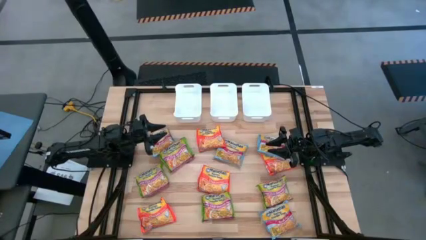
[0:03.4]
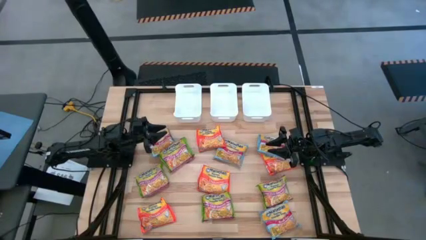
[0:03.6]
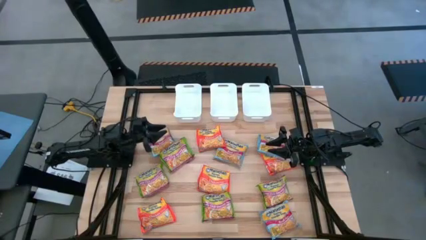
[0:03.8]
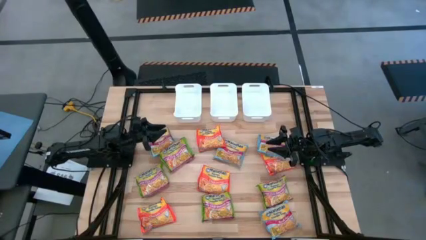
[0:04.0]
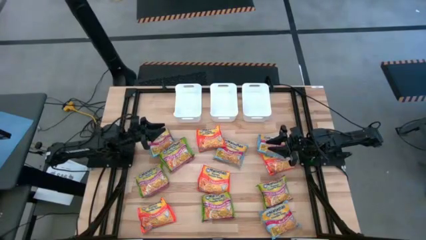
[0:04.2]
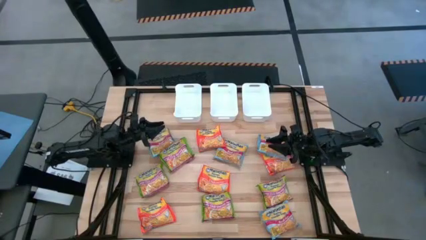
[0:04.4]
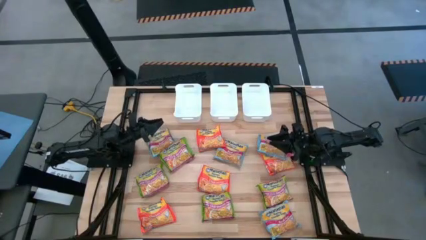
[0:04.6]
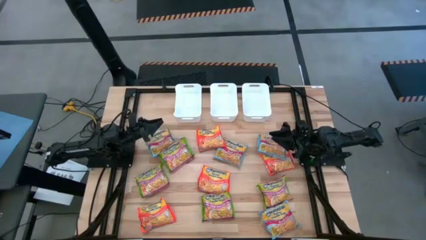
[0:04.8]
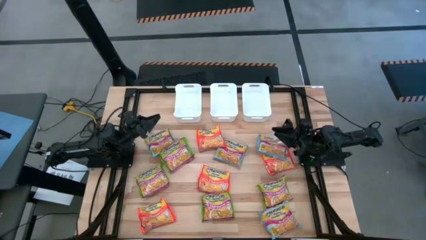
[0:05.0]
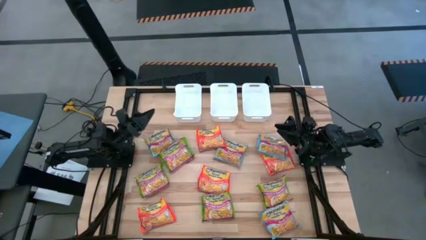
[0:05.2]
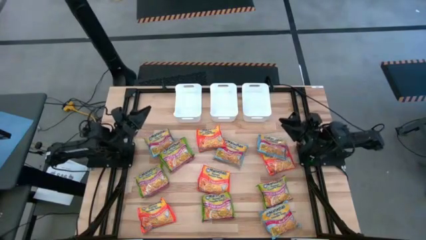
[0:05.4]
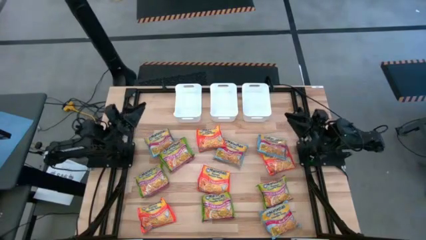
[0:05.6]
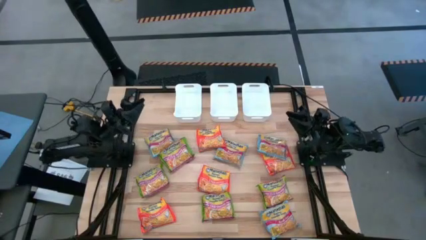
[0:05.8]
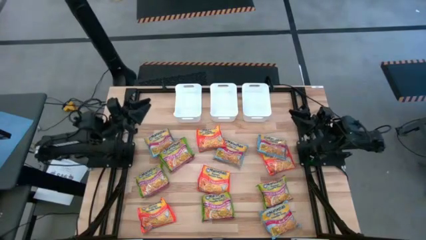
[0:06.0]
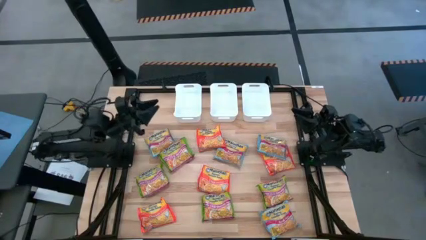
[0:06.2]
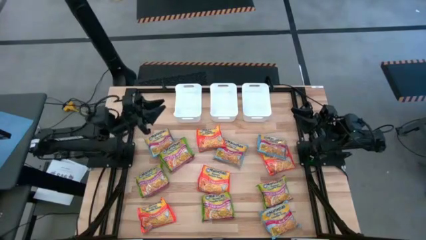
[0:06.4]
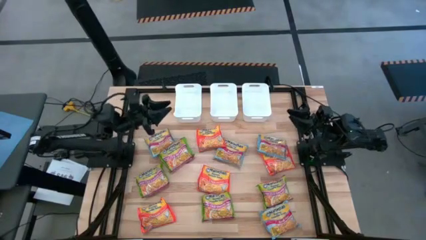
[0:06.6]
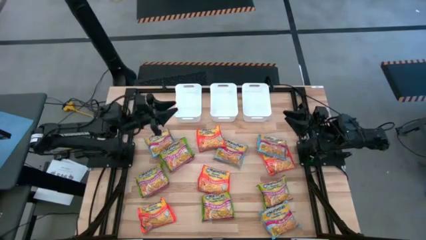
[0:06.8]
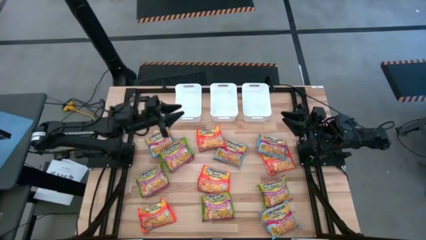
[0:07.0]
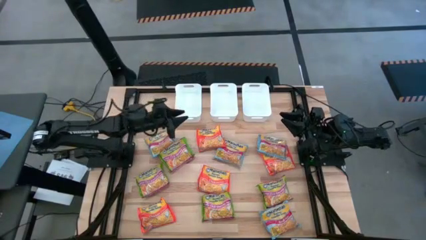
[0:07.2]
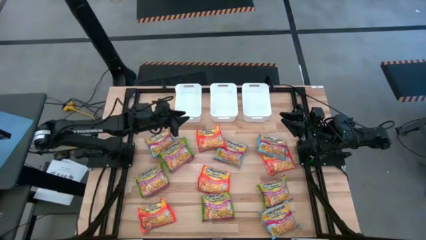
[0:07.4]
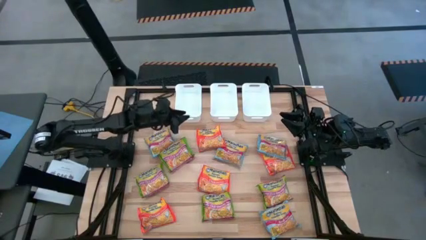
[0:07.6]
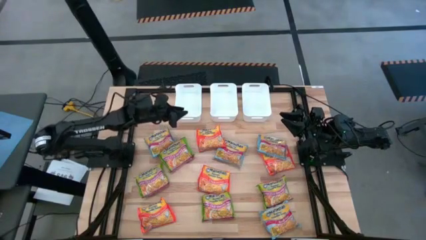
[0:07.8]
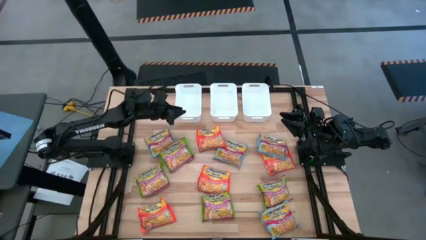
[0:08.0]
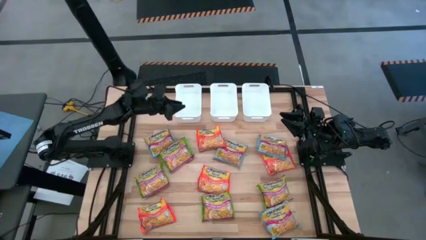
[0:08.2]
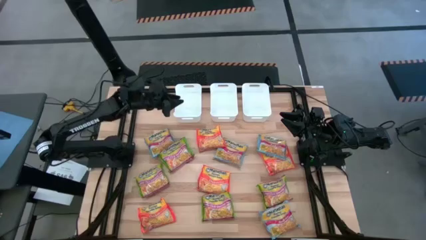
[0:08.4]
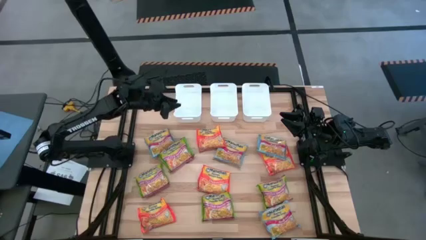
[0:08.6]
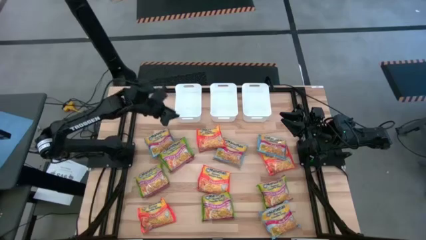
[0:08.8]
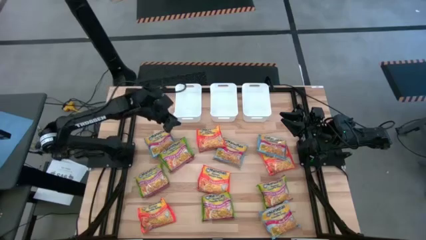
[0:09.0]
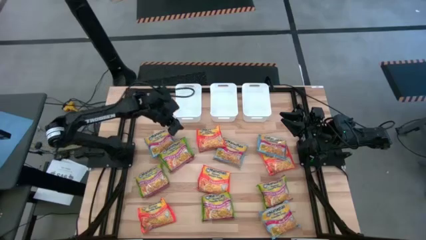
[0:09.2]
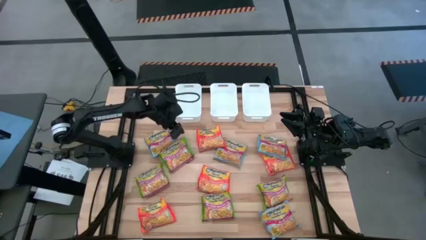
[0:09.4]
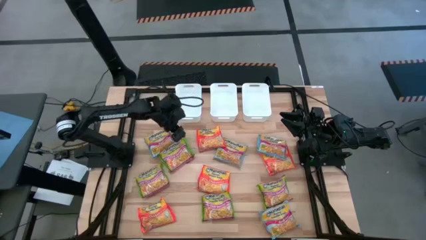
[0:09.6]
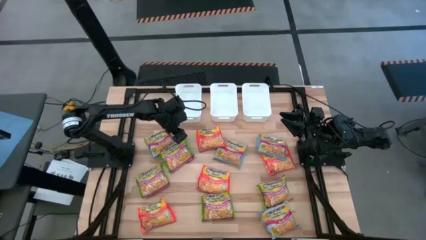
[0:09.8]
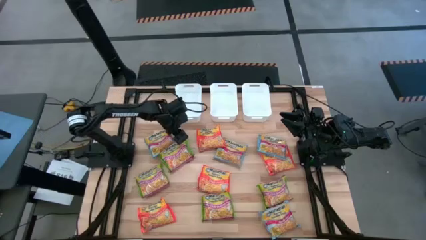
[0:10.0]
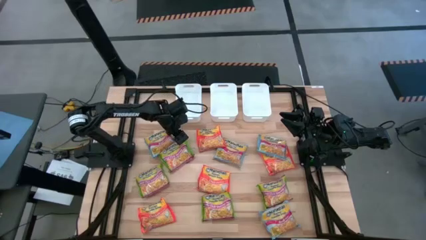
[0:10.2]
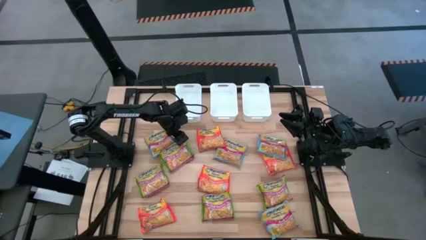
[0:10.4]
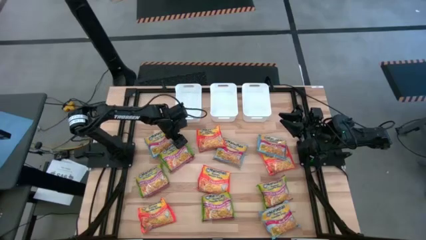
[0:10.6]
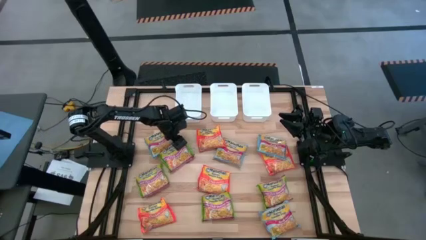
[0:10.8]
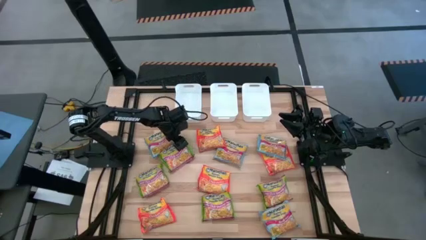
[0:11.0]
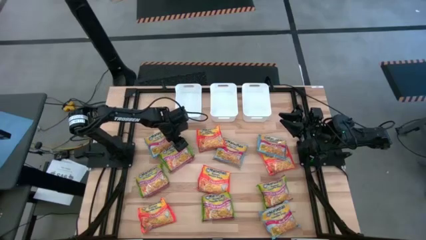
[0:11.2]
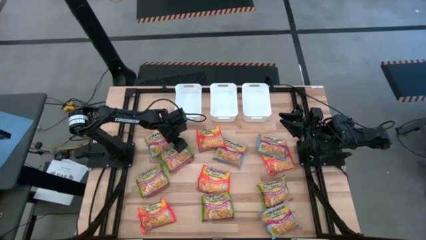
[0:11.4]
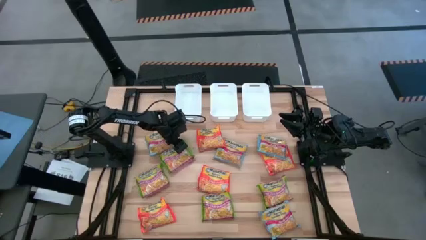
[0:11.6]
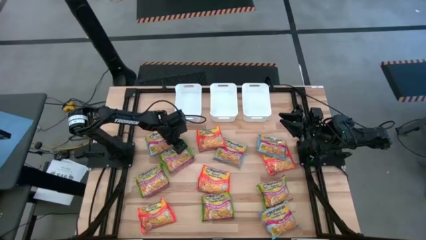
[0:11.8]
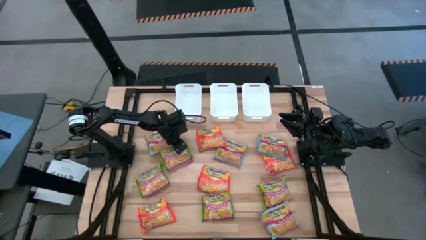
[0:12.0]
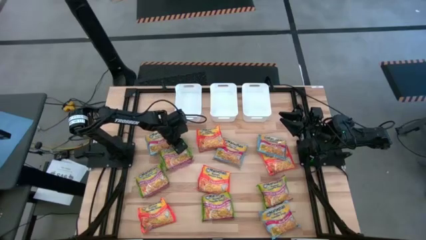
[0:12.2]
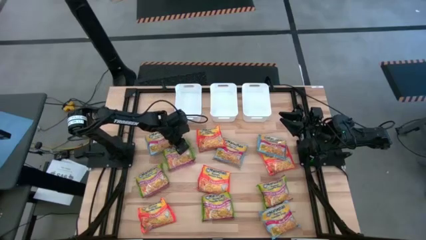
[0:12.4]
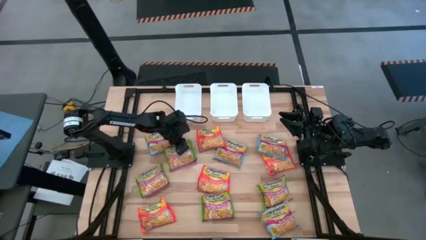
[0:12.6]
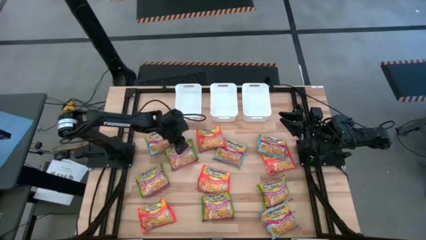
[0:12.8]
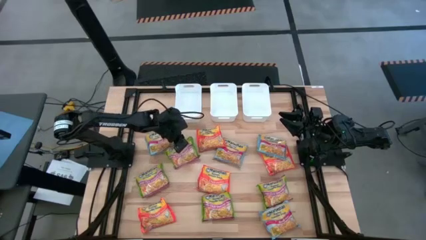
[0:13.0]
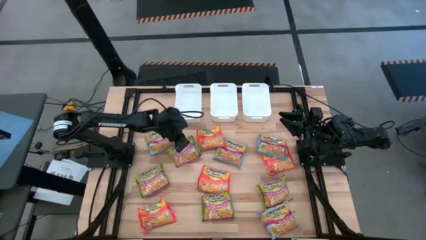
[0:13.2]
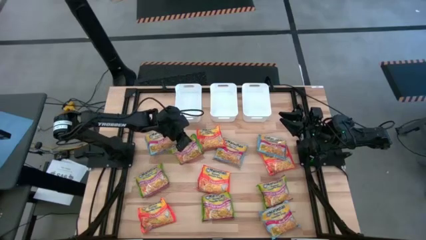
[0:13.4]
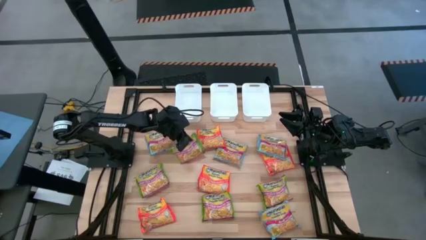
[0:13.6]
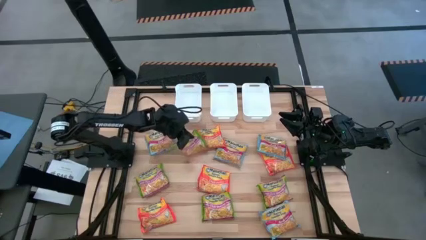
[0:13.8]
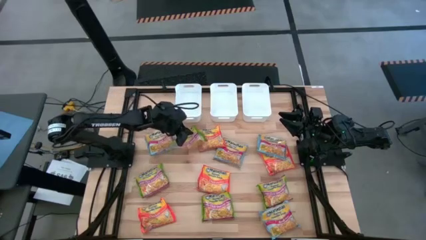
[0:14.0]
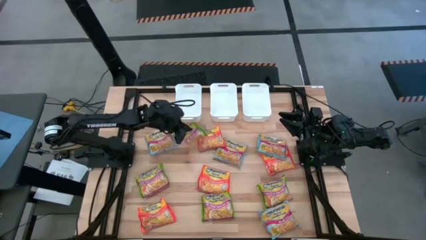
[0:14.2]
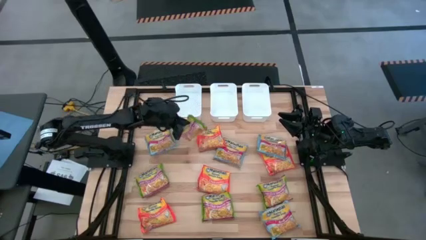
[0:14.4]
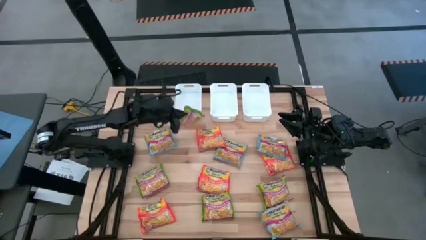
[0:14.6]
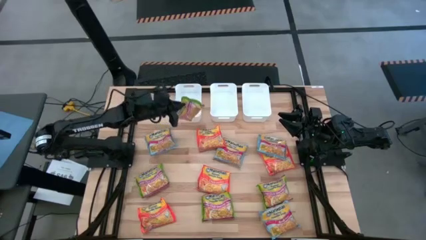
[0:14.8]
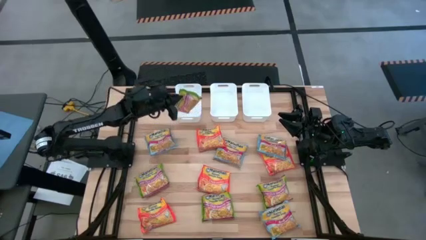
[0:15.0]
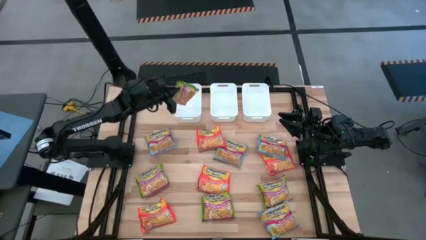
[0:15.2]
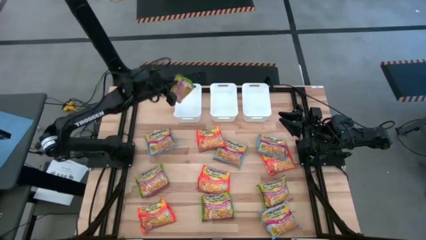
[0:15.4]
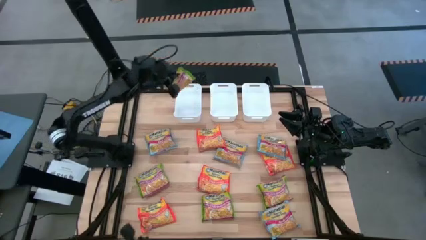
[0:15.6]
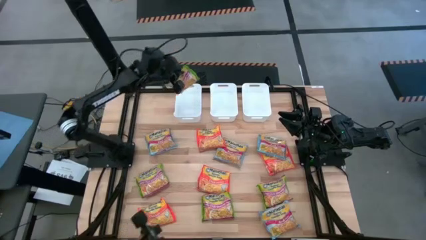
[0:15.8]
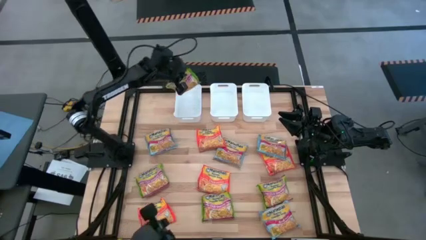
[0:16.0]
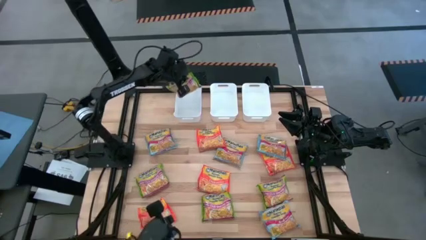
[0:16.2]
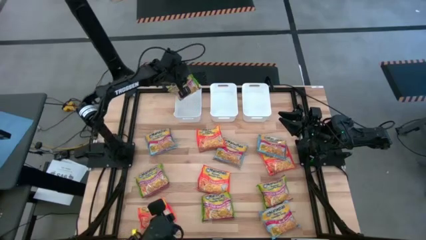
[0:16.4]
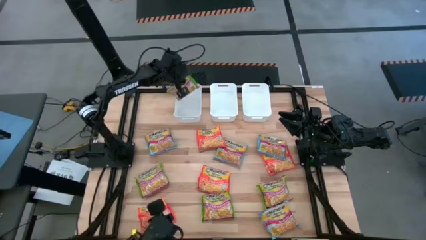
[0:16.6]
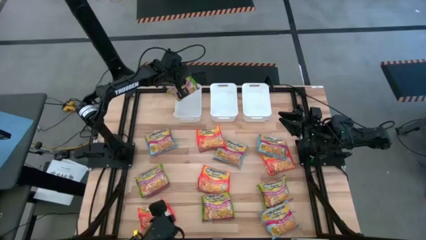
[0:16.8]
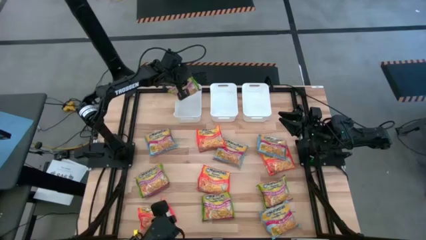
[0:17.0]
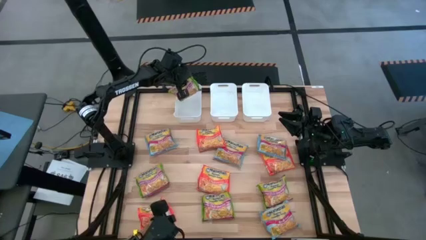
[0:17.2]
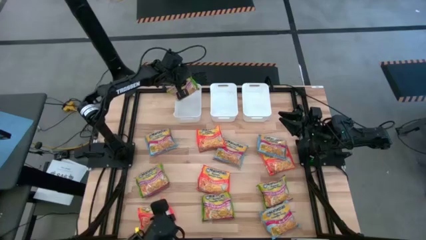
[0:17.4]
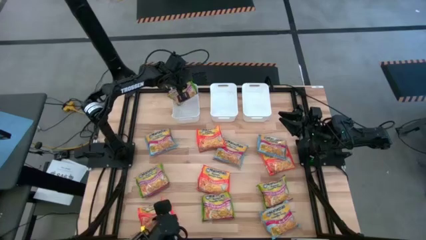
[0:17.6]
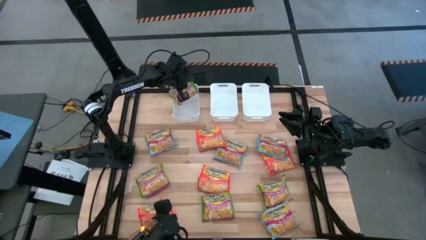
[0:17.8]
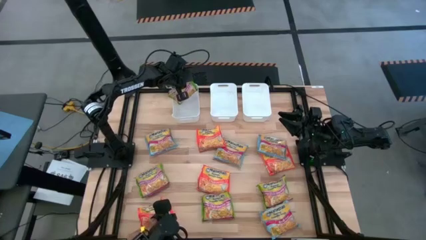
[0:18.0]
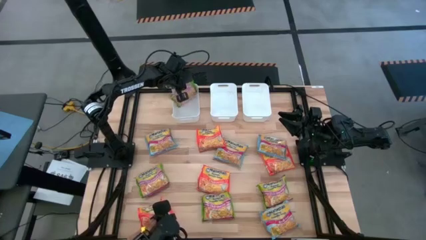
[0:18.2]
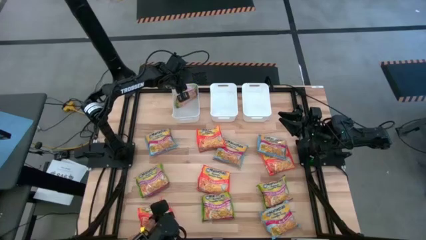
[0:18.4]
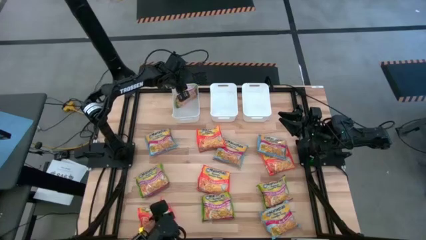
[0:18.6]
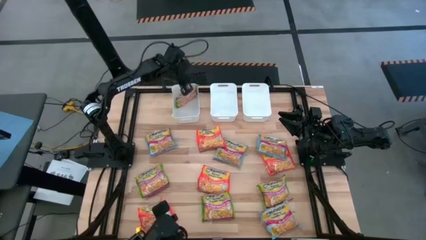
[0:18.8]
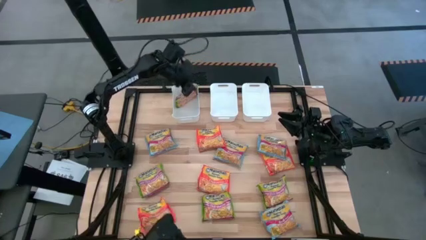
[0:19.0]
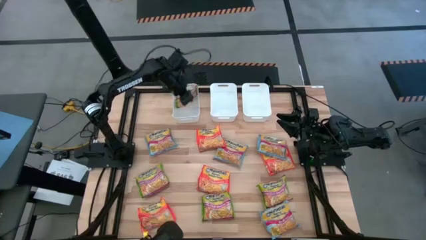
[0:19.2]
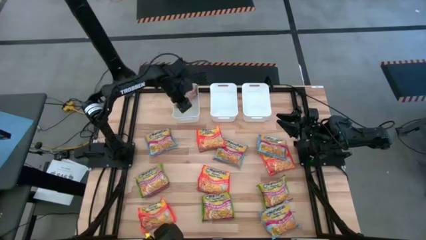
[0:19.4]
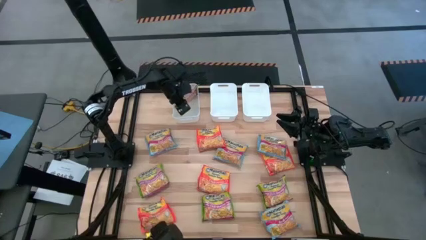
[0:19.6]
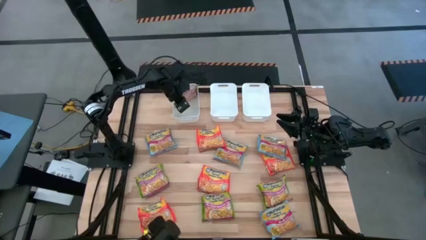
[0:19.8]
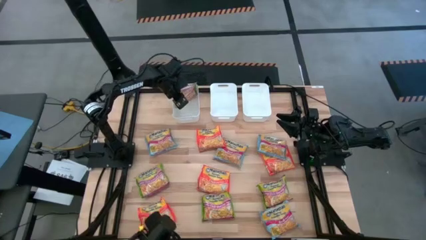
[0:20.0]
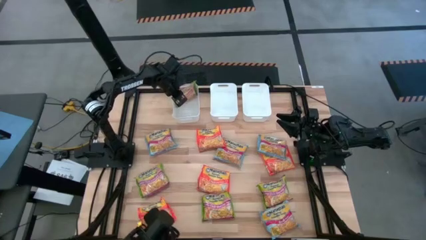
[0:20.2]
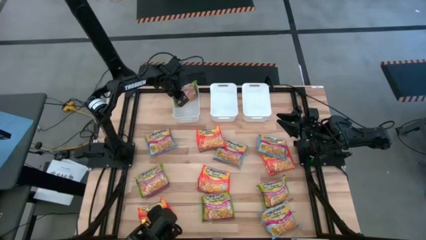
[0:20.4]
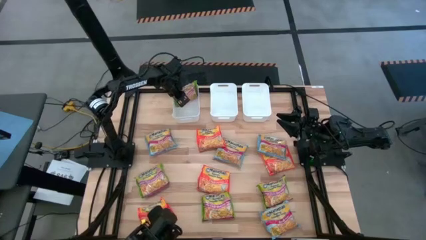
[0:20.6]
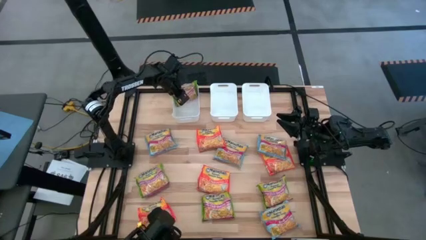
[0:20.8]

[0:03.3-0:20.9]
Task: Sort Maruchan noodles
Put the green noodle pack into the left white bin
